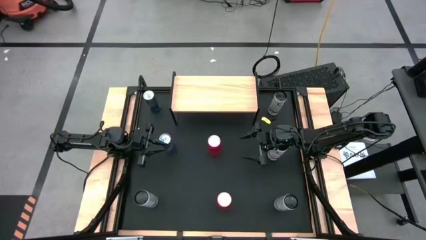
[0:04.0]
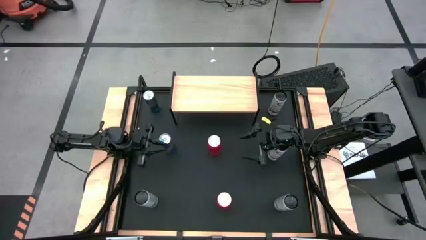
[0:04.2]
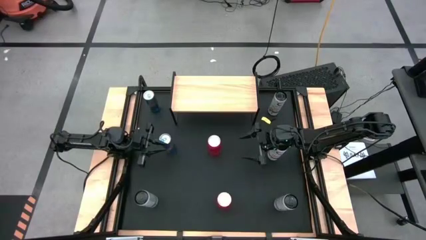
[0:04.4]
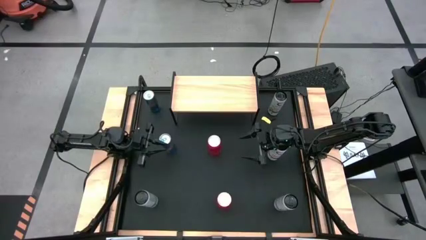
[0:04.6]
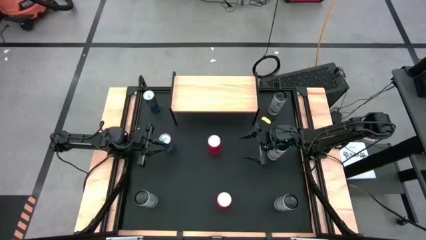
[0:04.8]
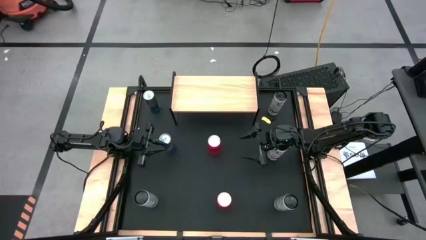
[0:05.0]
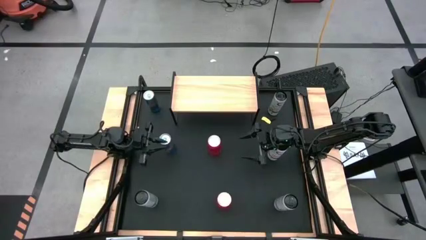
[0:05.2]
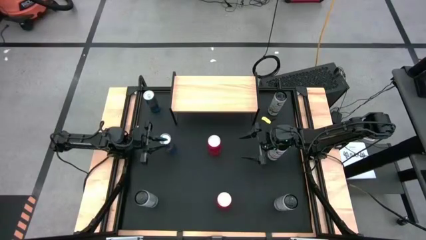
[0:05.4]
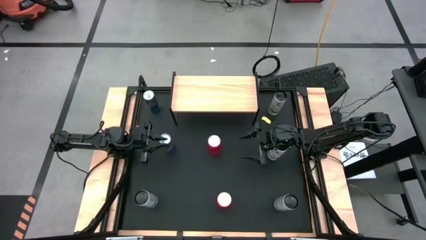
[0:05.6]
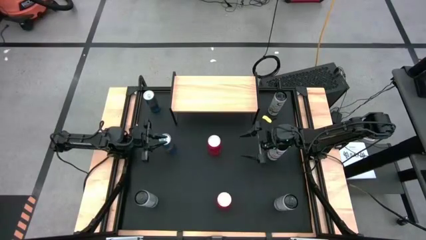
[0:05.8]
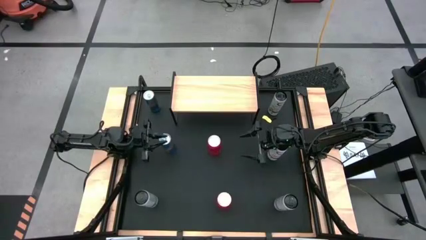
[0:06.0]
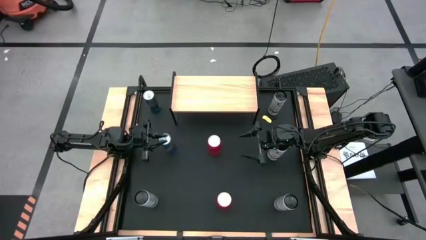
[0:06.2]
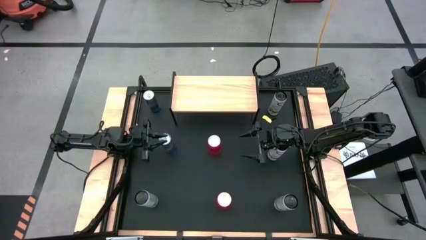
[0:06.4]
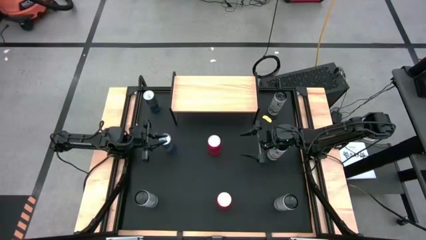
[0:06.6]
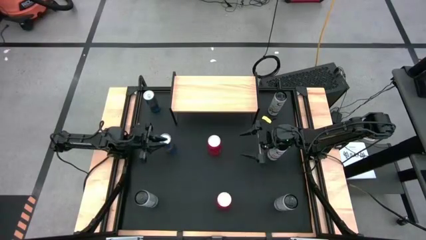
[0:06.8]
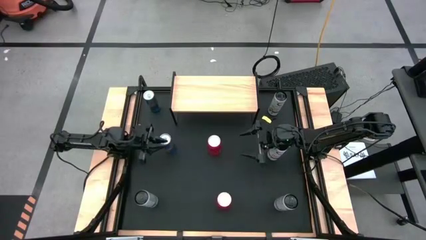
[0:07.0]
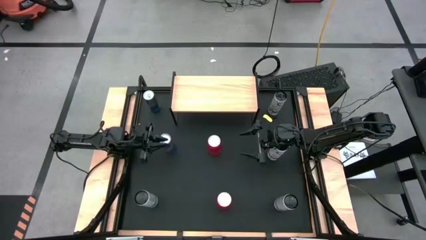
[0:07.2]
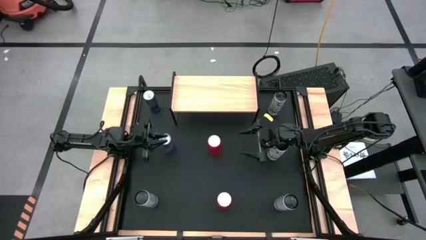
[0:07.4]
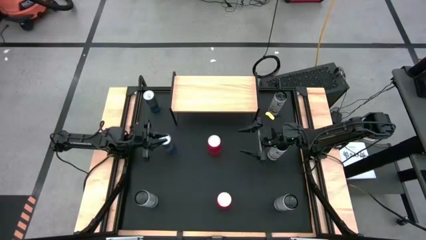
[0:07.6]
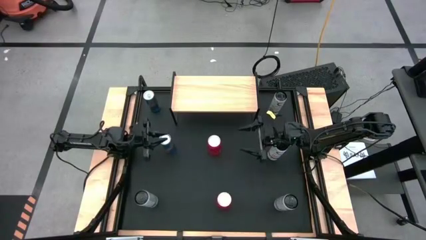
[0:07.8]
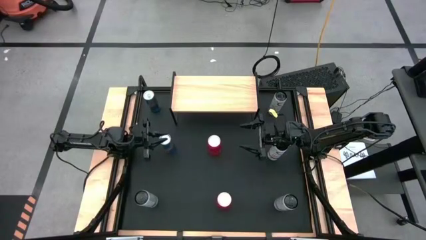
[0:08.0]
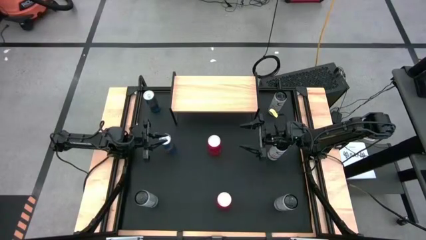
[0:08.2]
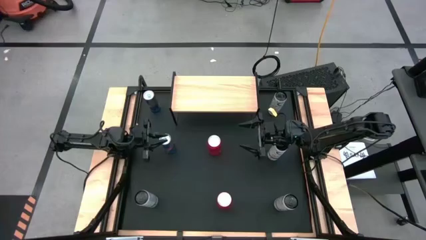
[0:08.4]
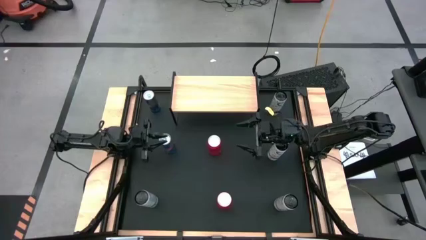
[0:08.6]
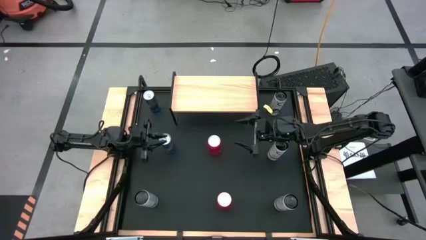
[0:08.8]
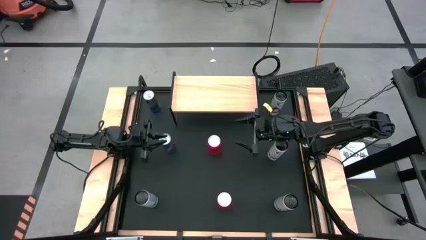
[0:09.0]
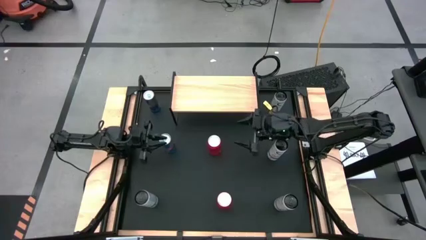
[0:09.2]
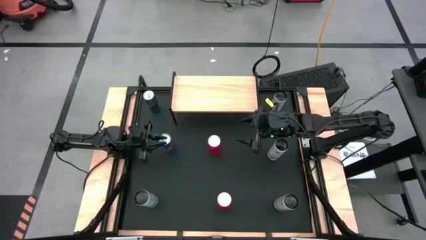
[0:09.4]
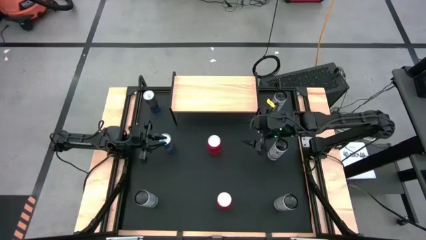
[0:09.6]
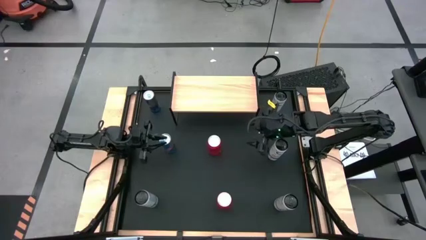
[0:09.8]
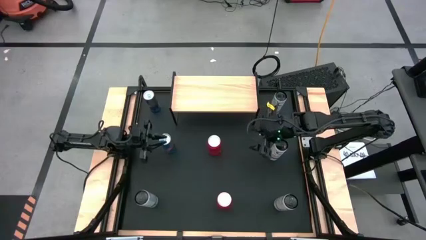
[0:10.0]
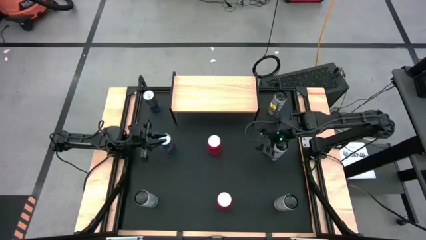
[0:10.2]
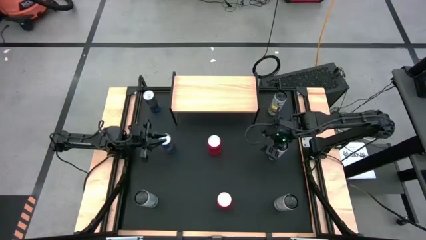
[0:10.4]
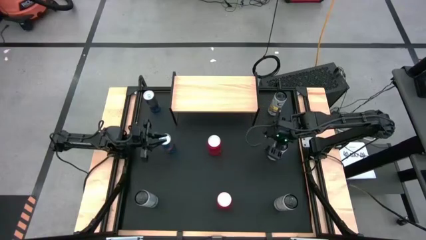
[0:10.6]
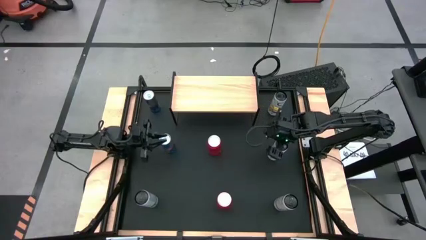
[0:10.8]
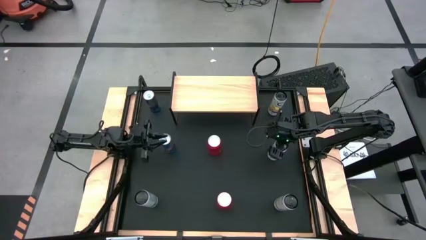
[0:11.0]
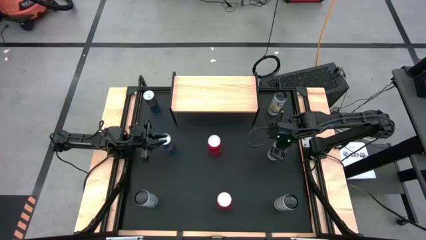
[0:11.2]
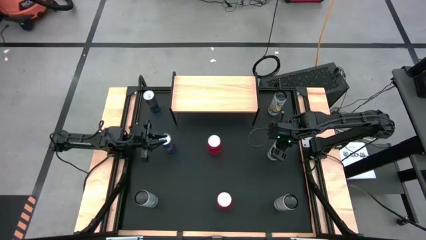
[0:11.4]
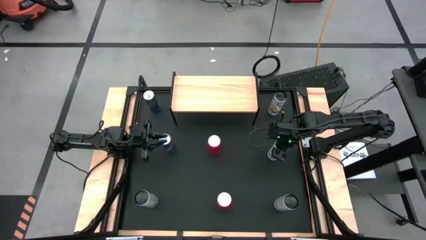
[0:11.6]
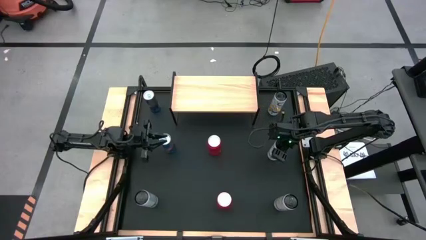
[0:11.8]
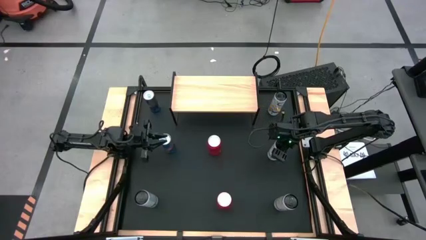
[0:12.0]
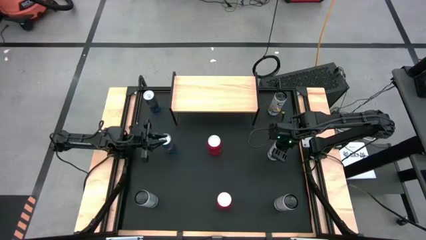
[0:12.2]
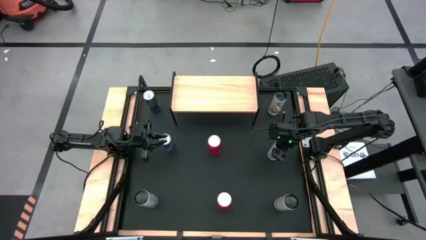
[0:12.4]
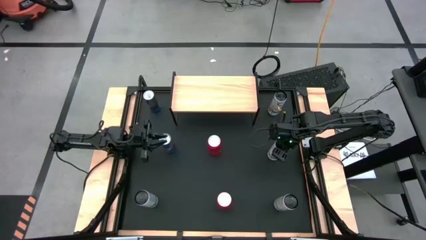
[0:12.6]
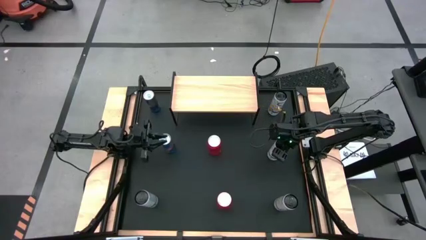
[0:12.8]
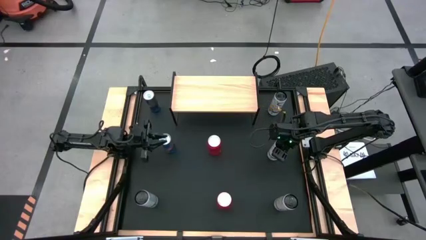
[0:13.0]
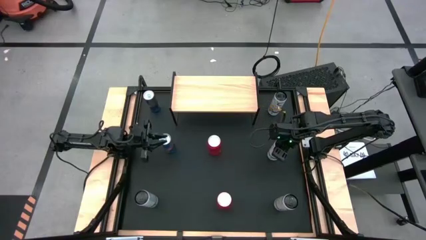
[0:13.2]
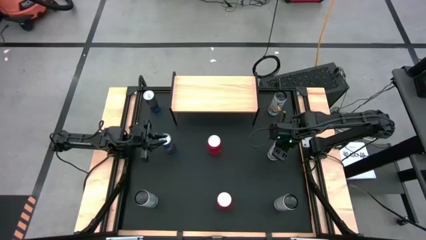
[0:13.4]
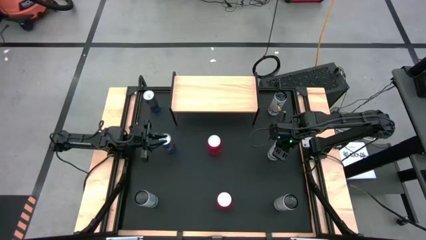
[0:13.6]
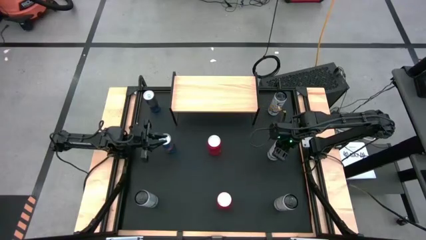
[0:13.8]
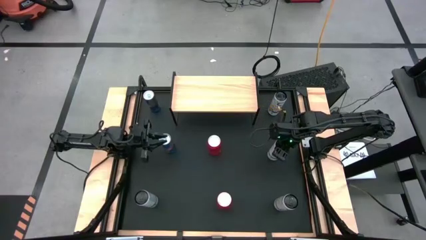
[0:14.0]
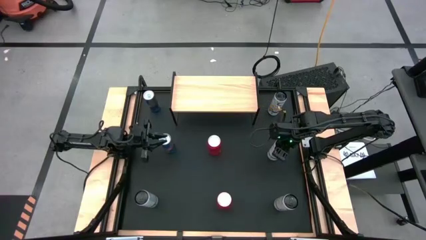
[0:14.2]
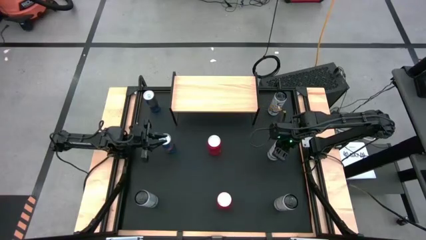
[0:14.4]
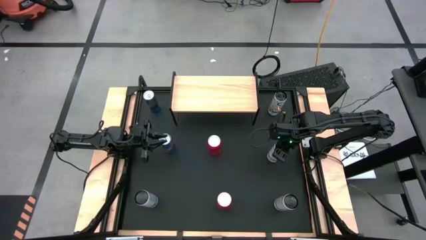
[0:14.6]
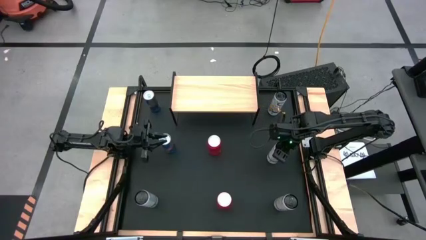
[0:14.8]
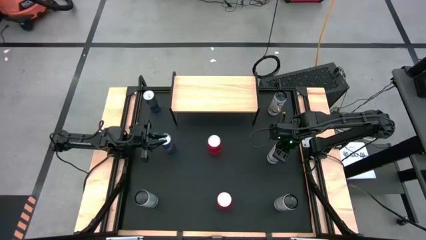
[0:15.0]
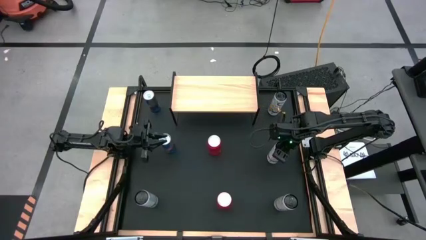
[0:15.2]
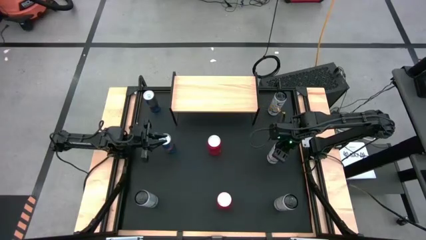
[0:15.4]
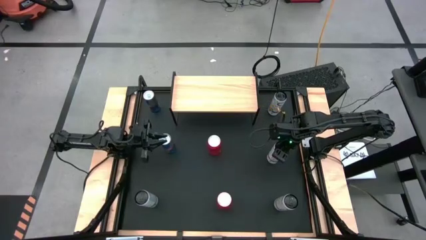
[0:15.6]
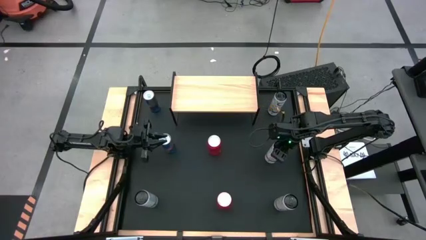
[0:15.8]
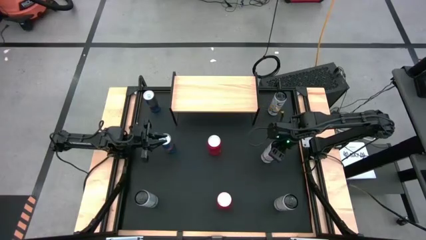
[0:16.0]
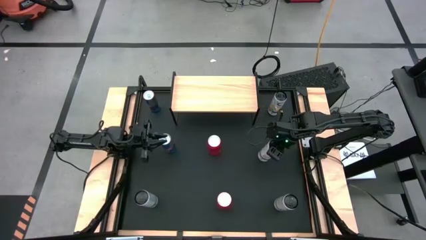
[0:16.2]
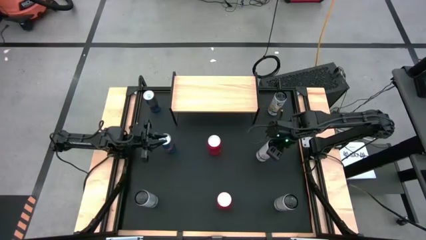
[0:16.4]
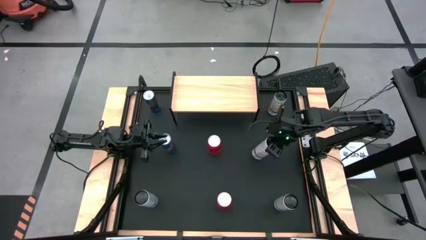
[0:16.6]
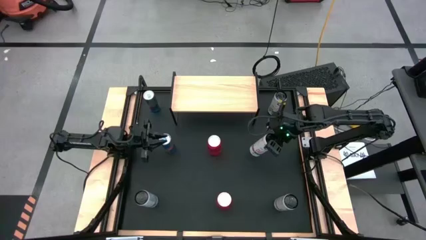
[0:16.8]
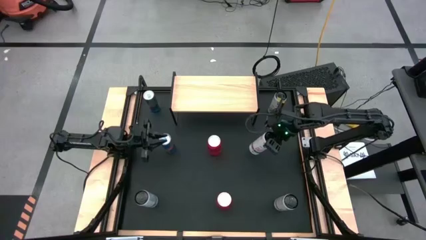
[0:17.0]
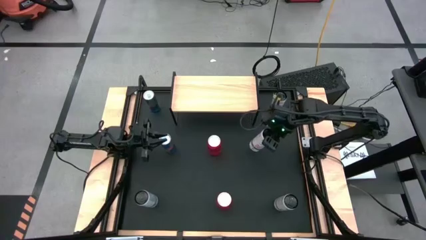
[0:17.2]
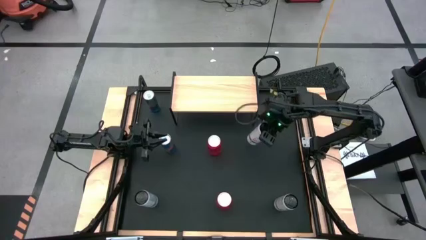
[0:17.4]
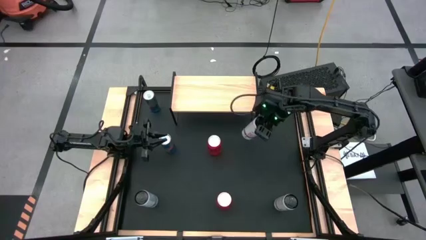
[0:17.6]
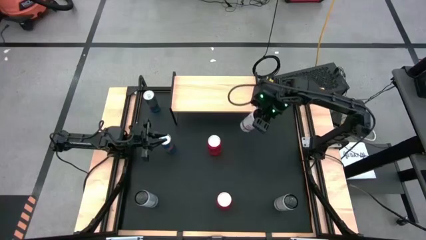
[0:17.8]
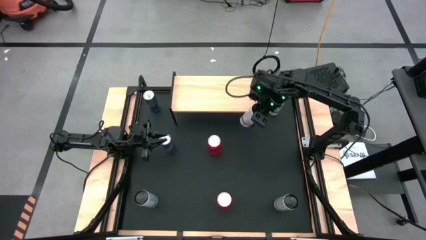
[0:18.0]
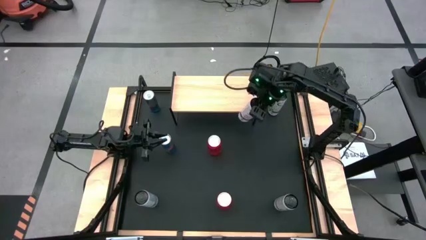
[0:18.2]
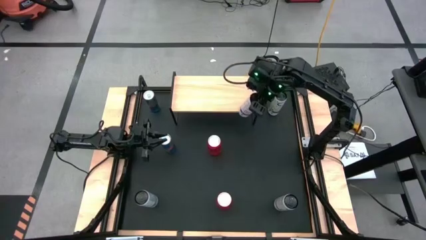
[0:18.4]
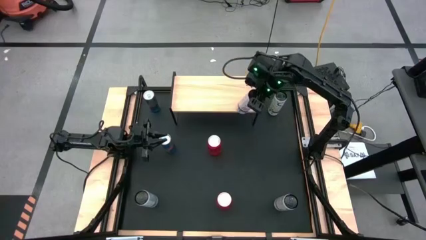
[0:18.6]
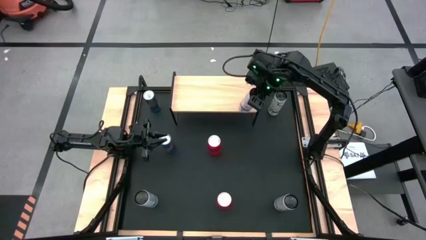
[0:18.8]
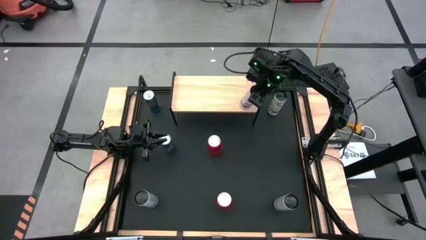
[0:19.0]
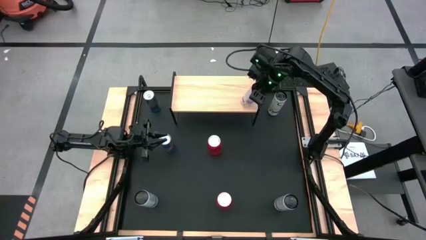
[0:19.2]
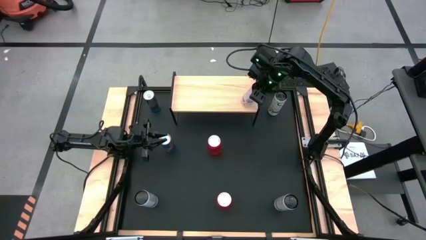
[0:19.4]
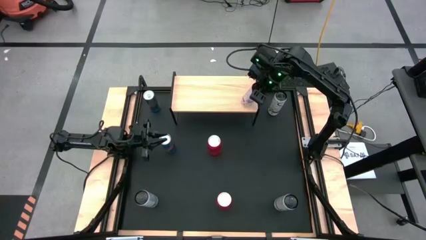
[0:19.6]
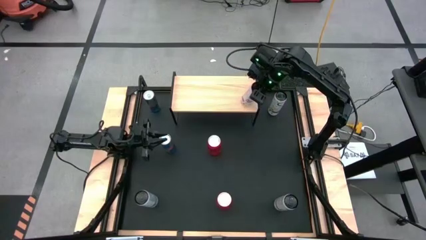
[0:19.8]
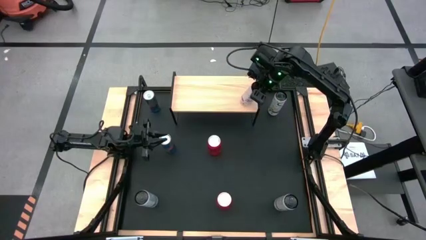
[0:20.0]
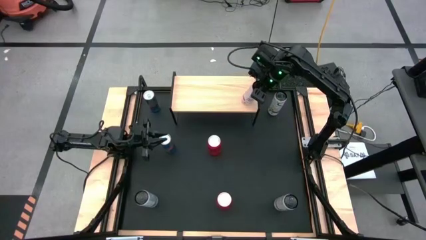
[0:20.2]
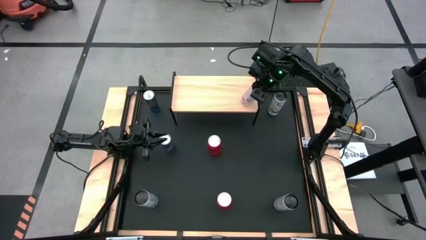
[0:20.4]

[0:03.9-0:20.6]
Task: Place canned beverage on shelf
Put the top white pink soda can on the shelf
